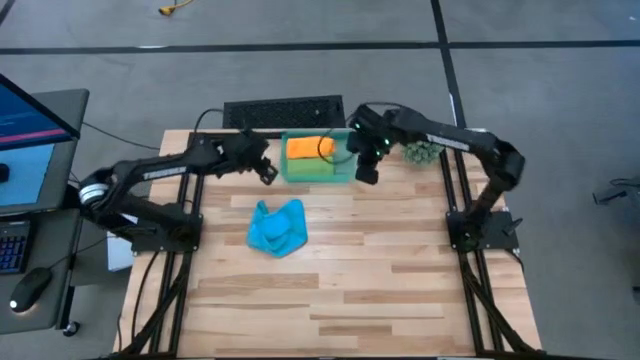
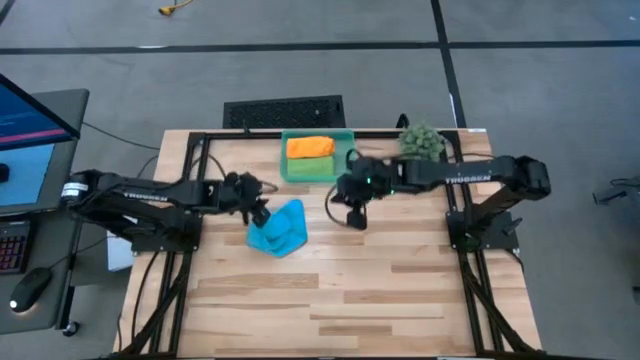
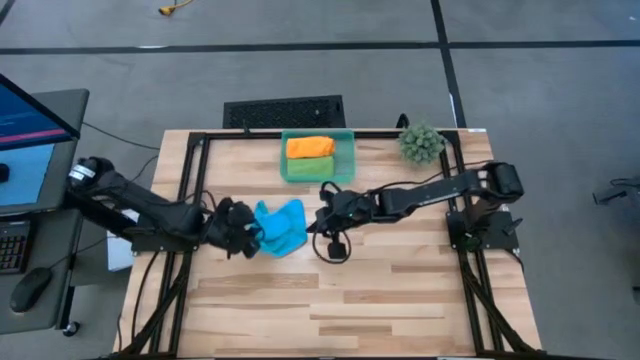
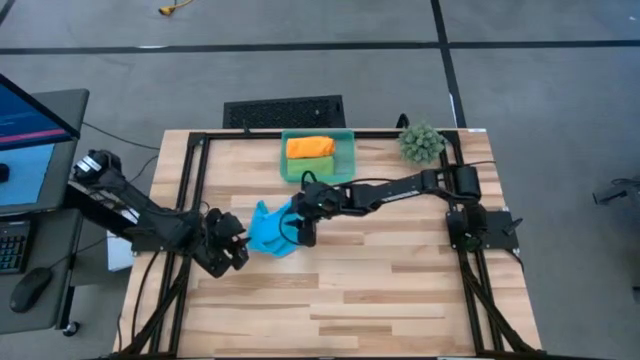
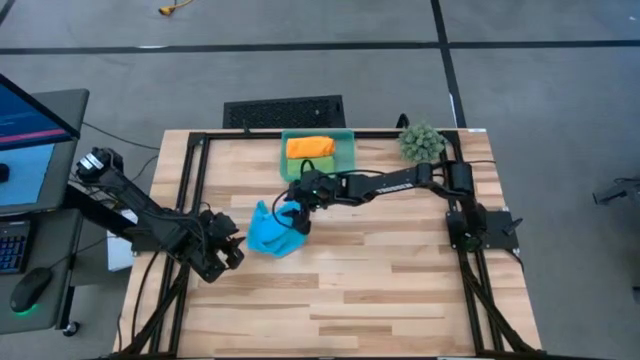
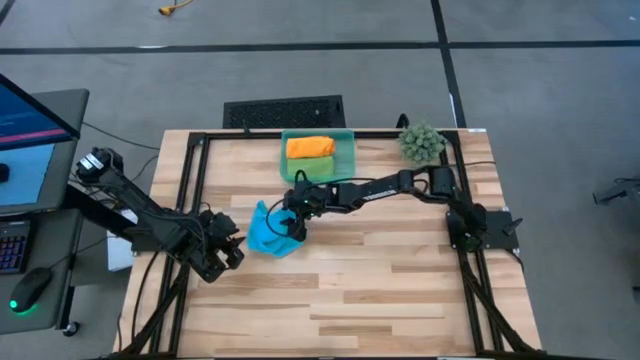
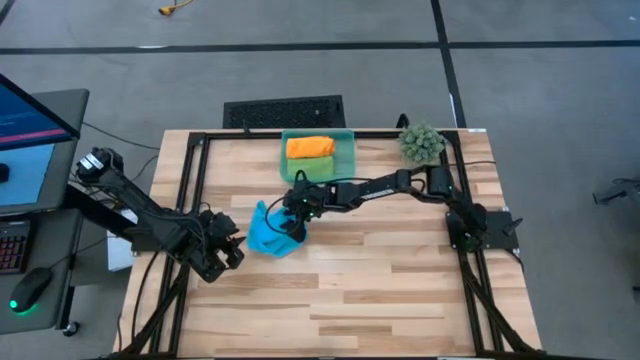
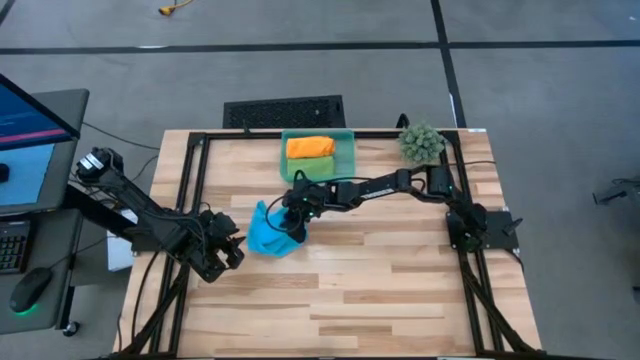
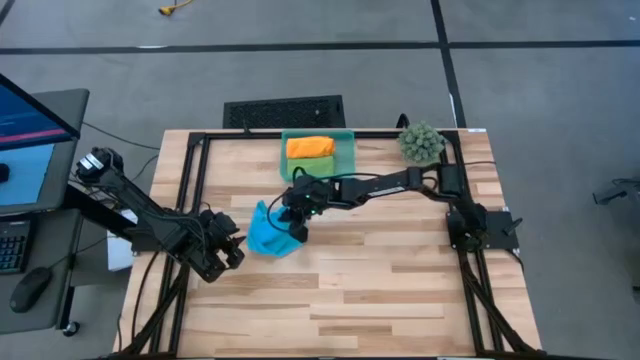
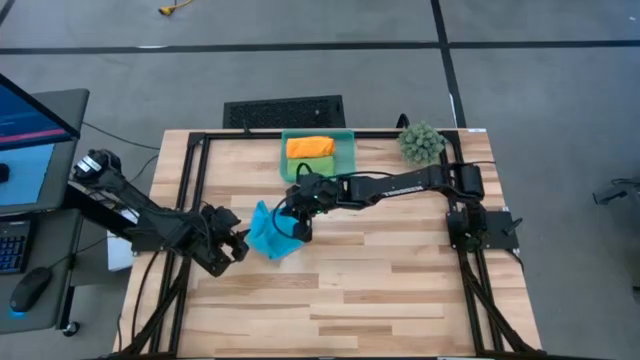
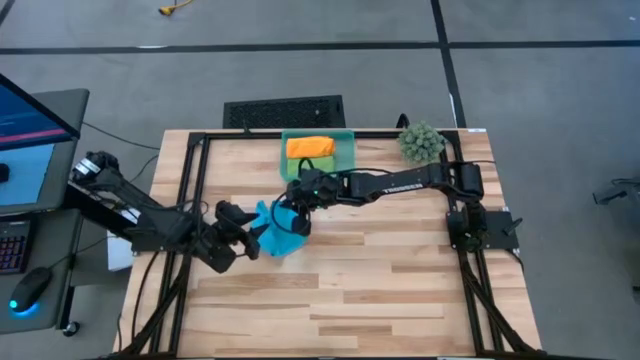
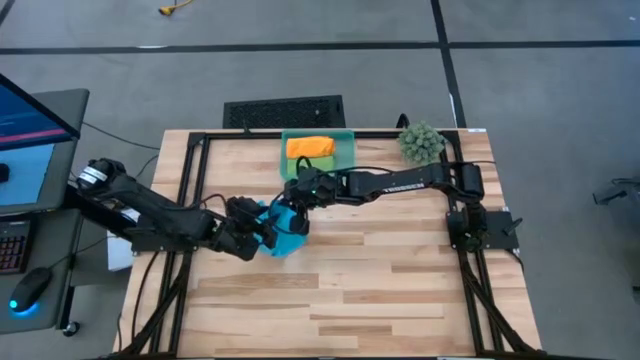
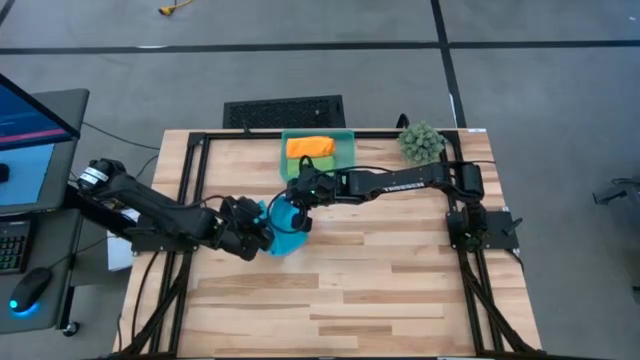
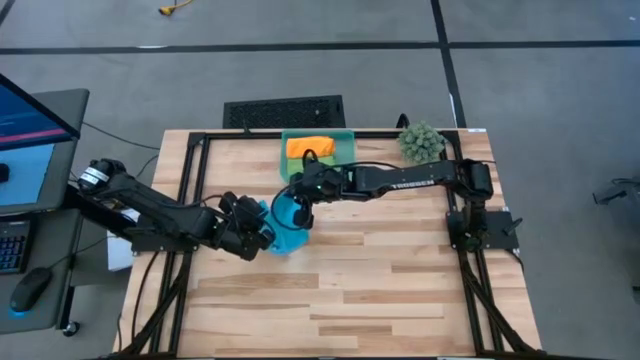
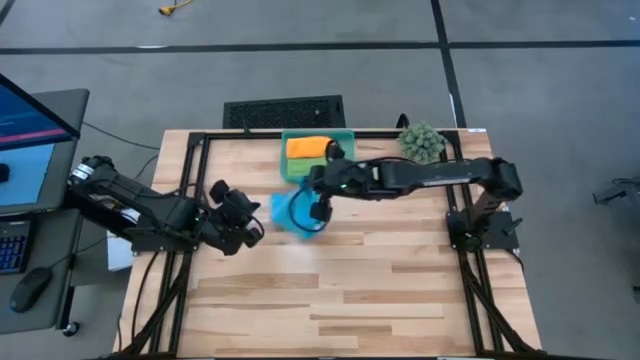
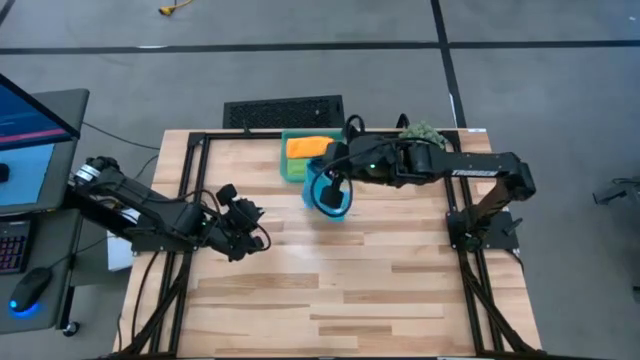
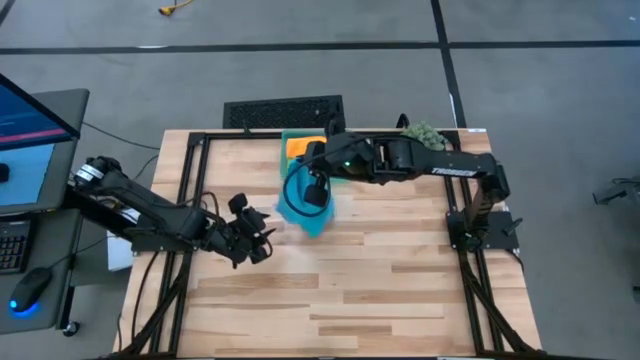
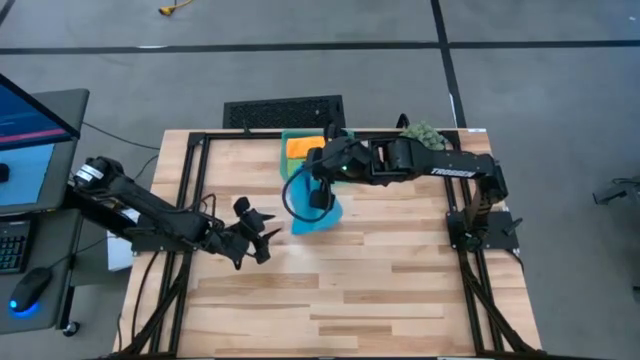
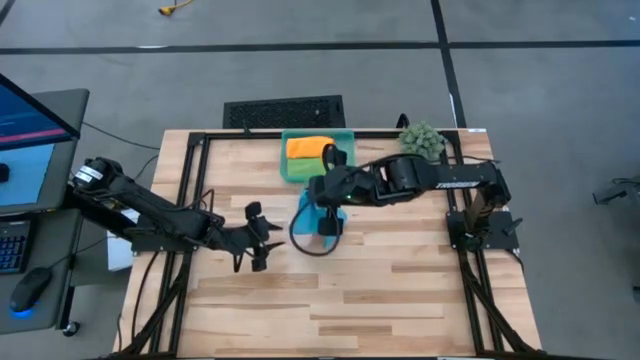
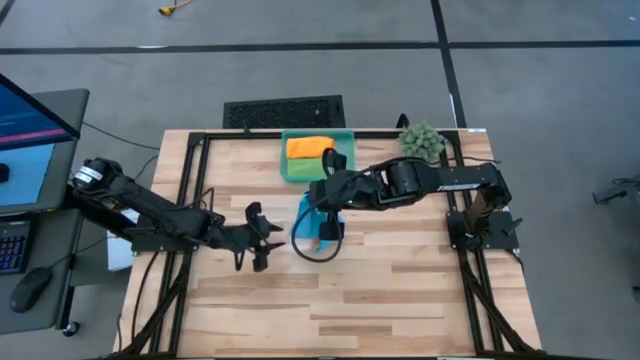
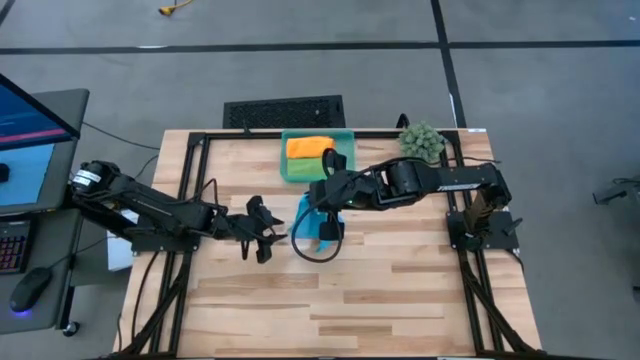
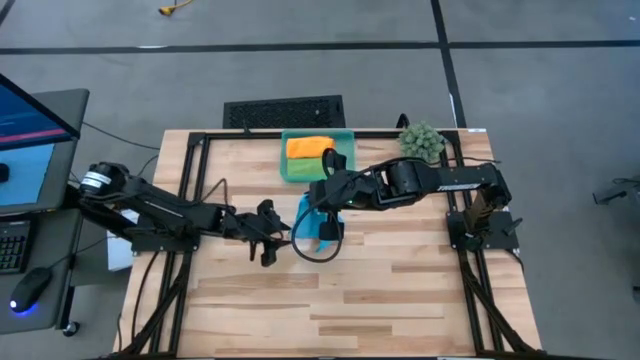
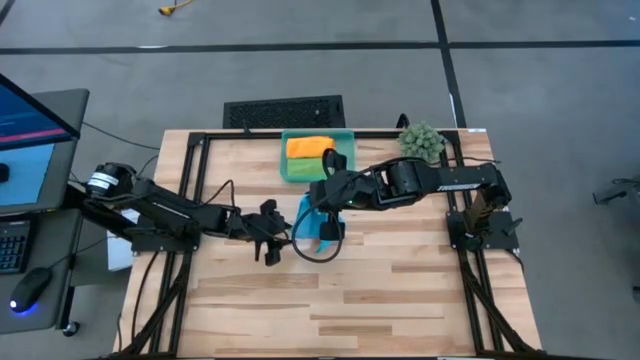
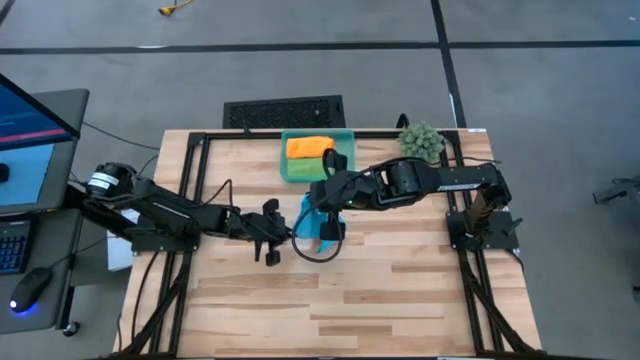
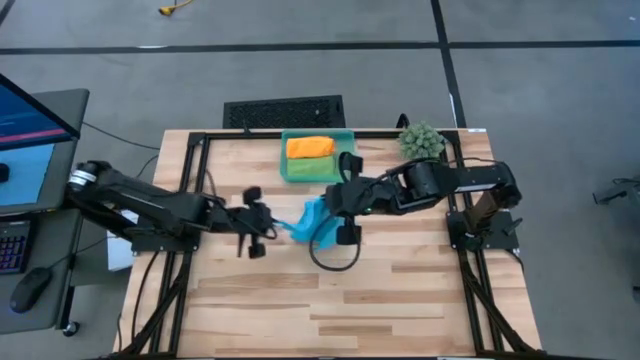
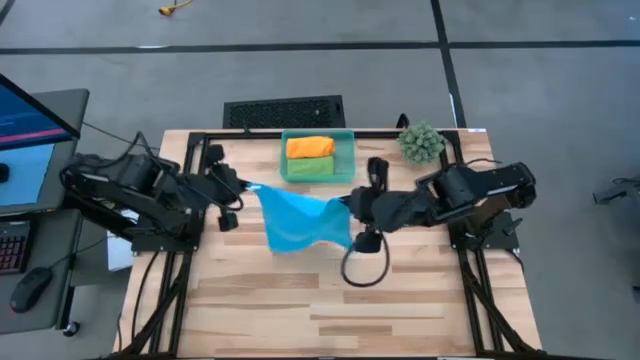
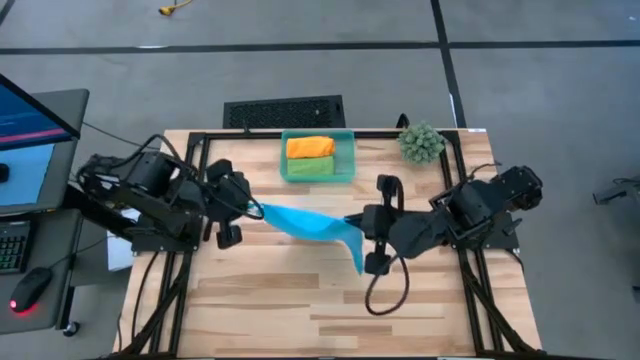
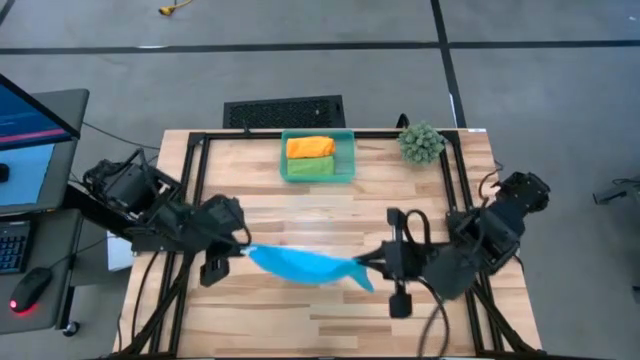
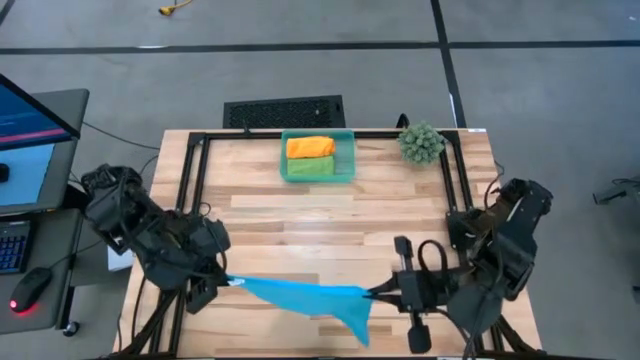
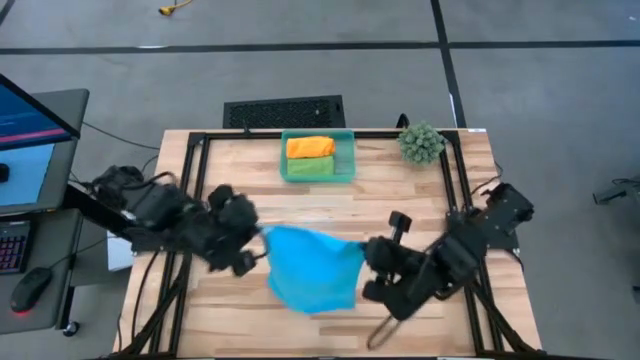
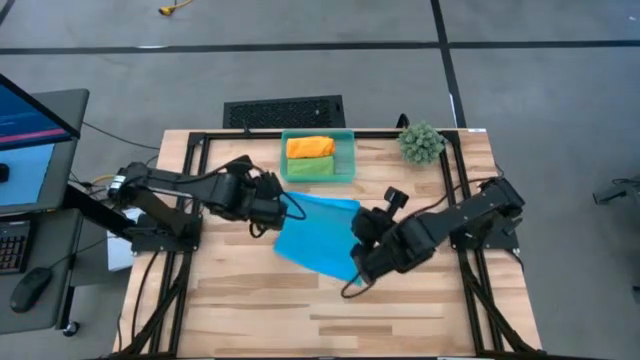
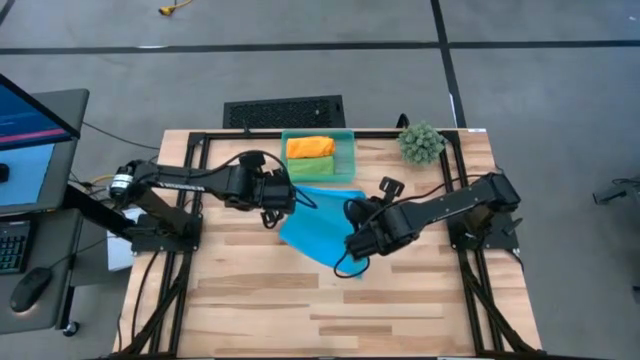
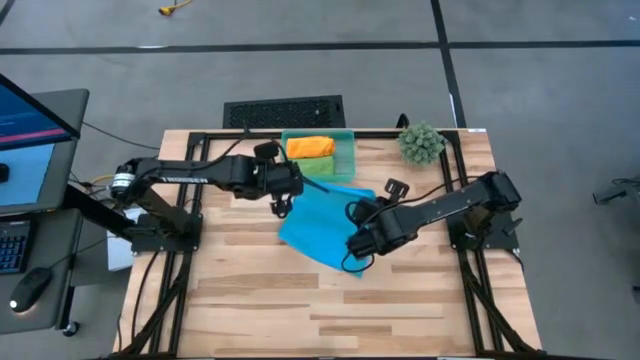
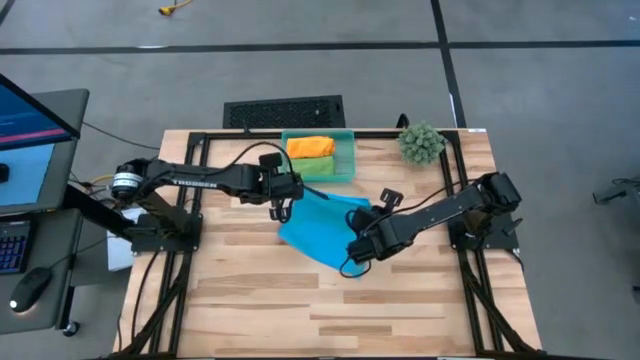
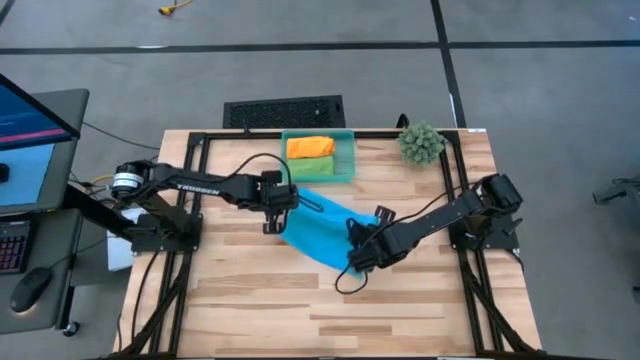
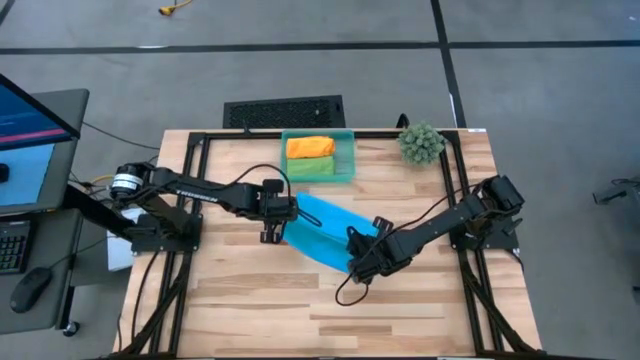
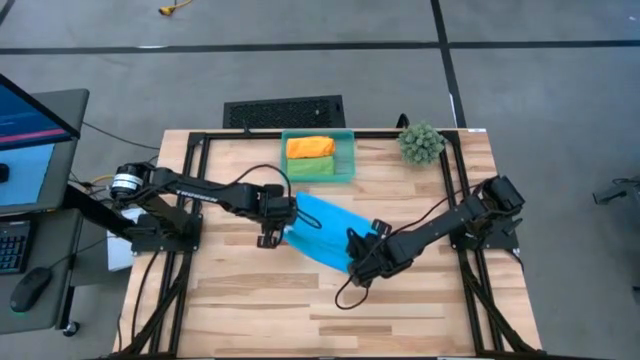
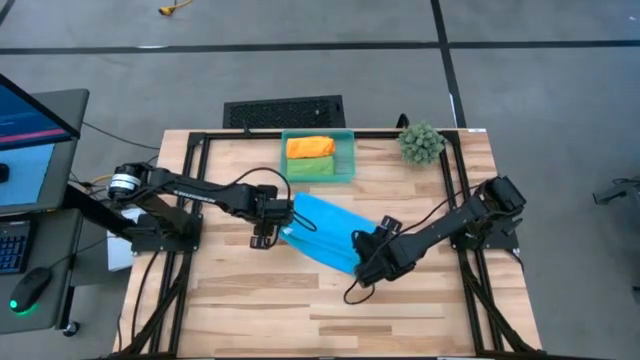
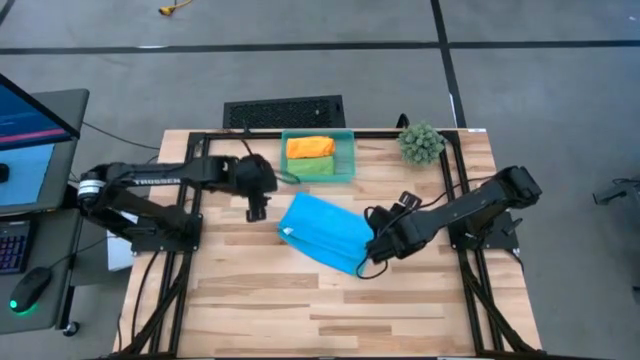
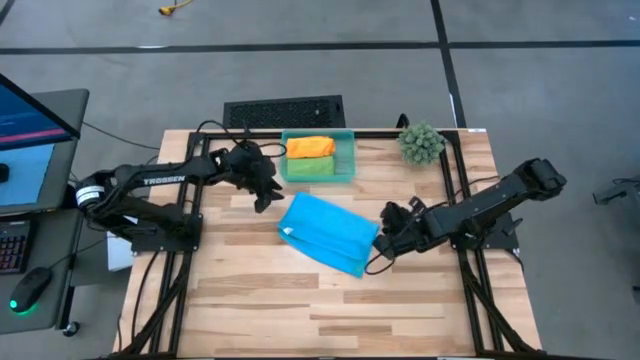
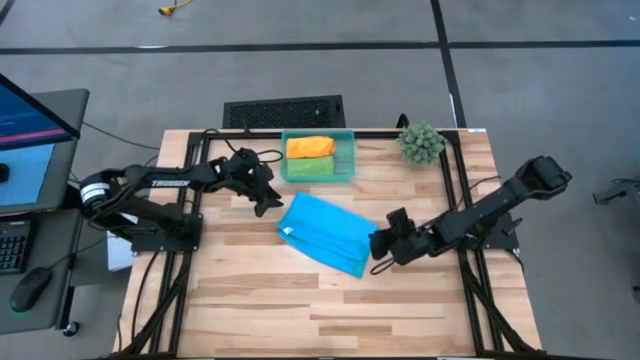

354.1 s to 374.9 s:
Task: Roll microfiber towels into tight, uniform cylinder then place into a basket
Roll the blue microfiber cloth
